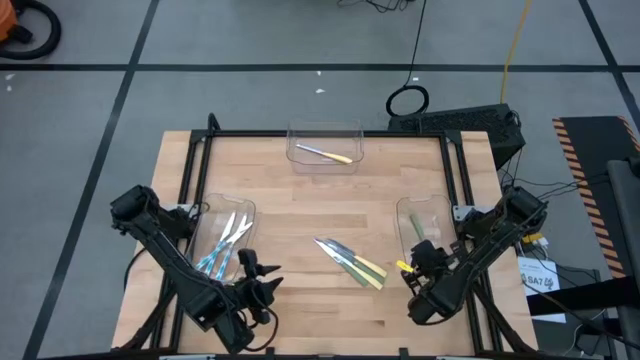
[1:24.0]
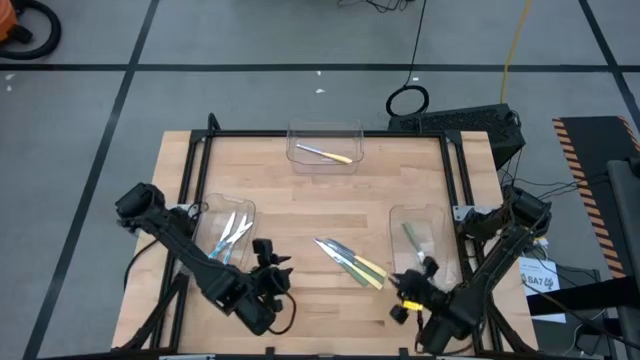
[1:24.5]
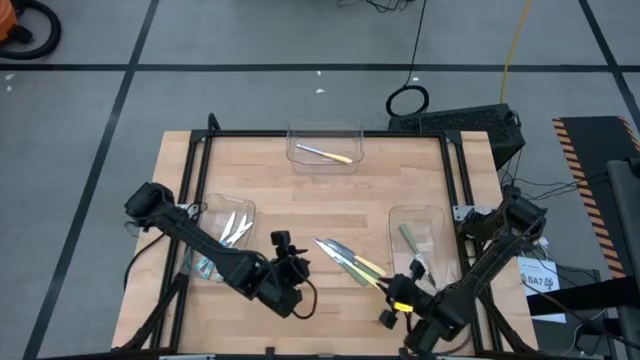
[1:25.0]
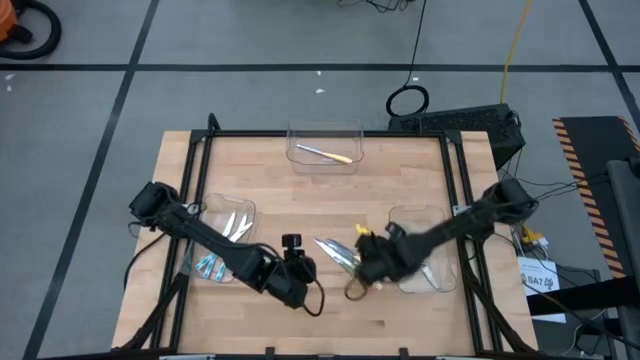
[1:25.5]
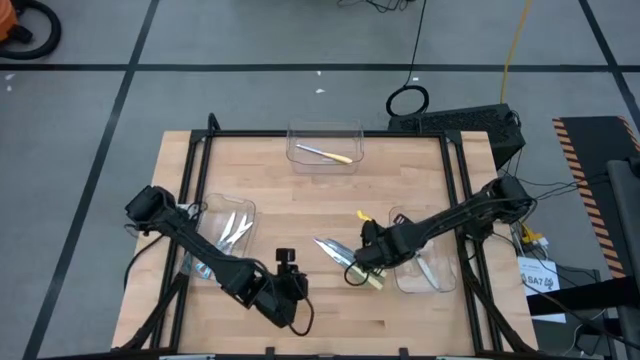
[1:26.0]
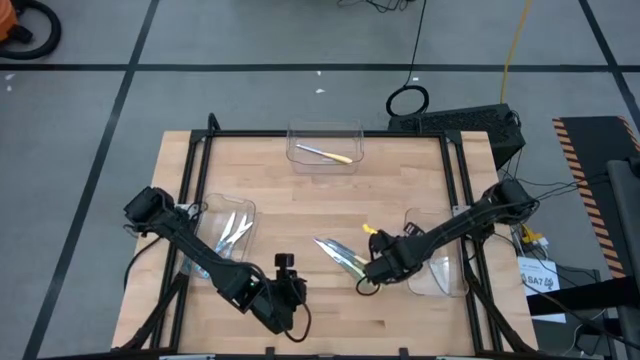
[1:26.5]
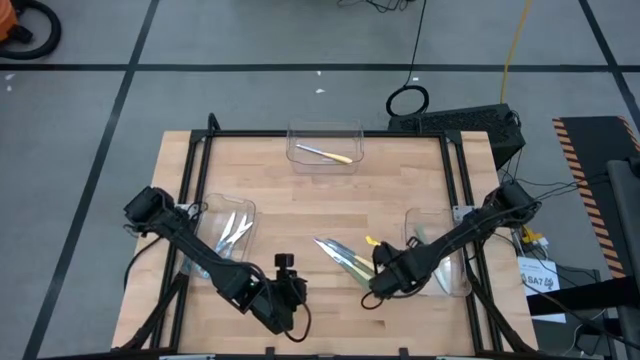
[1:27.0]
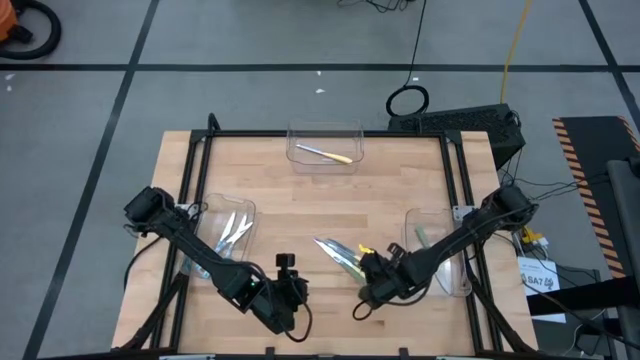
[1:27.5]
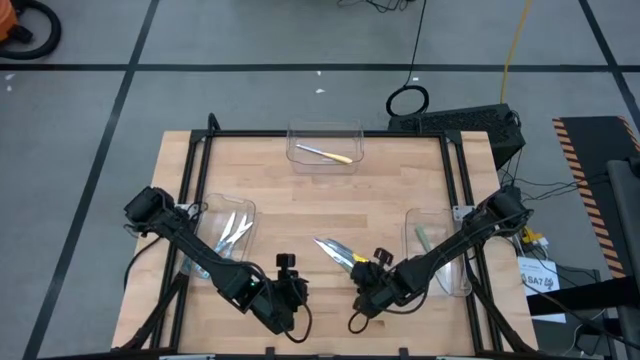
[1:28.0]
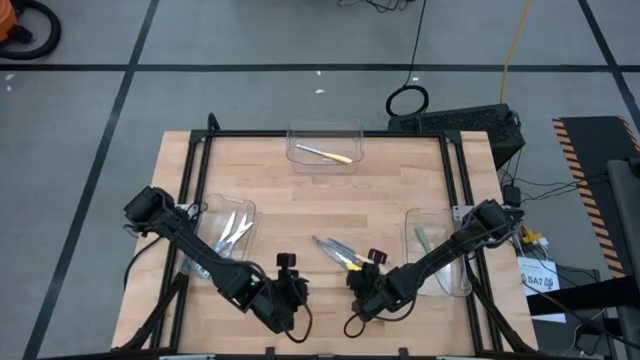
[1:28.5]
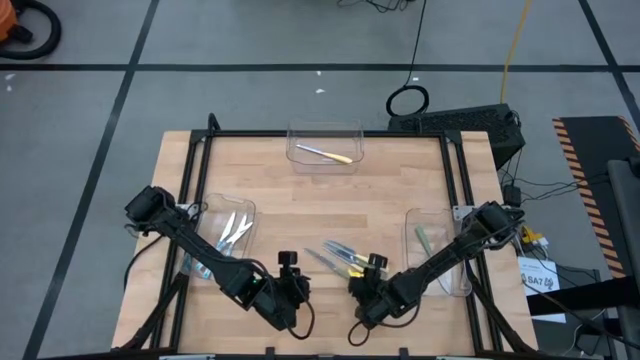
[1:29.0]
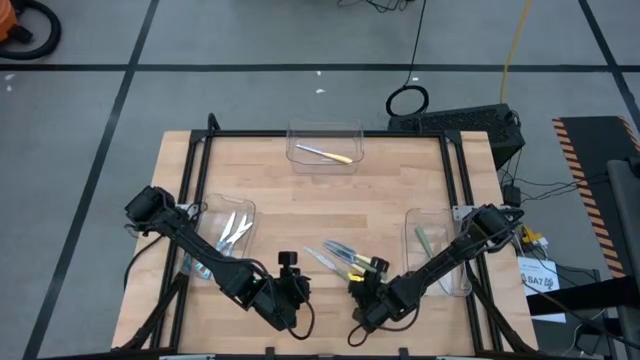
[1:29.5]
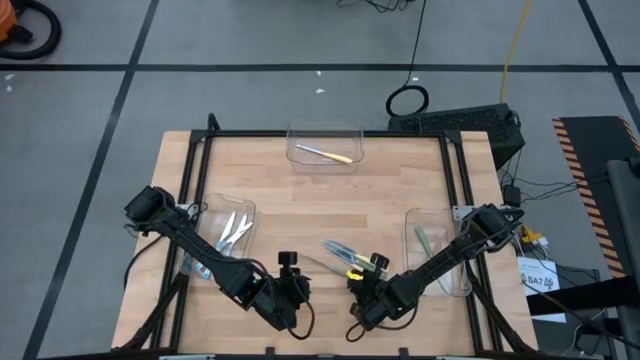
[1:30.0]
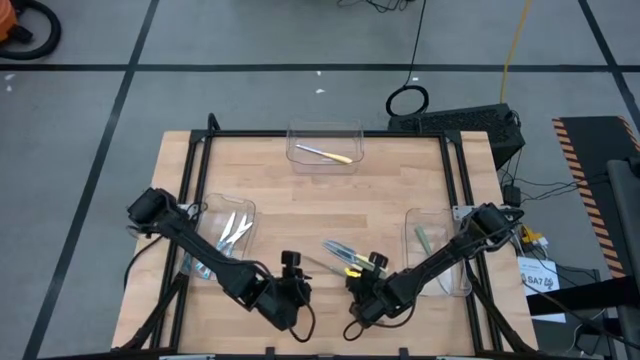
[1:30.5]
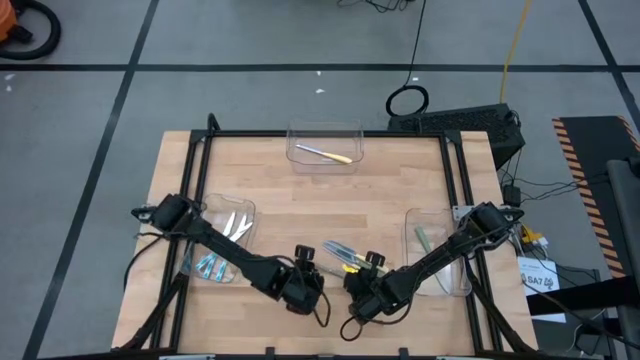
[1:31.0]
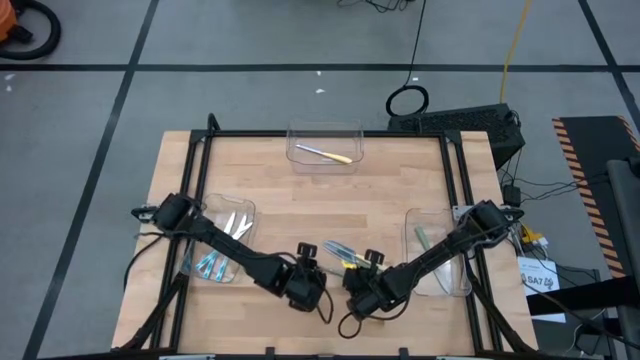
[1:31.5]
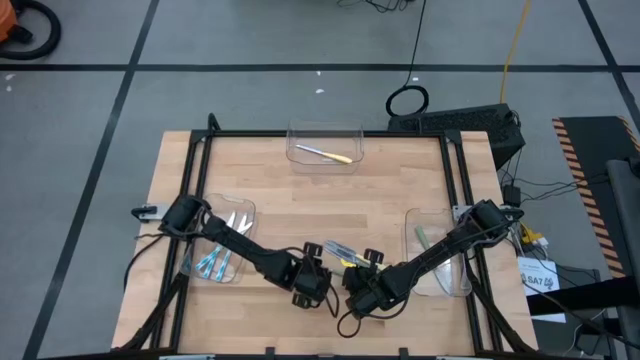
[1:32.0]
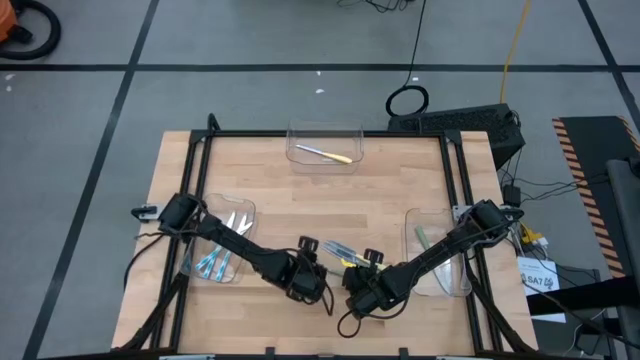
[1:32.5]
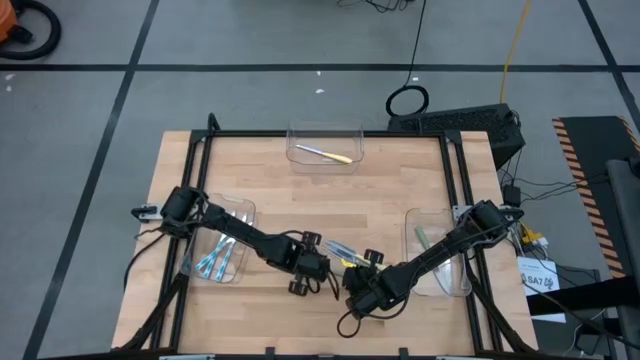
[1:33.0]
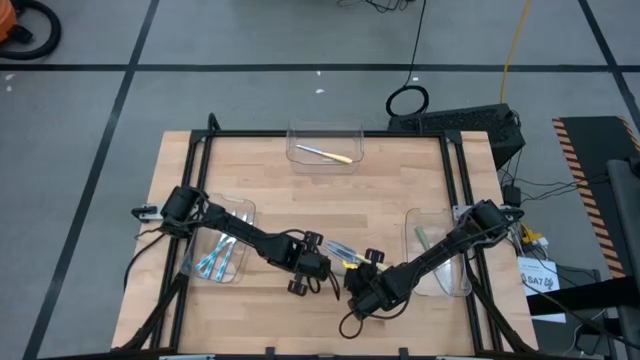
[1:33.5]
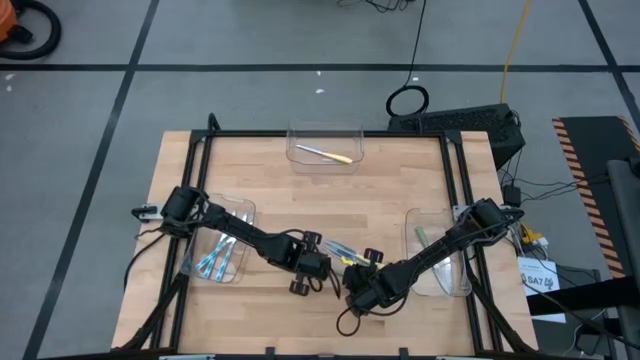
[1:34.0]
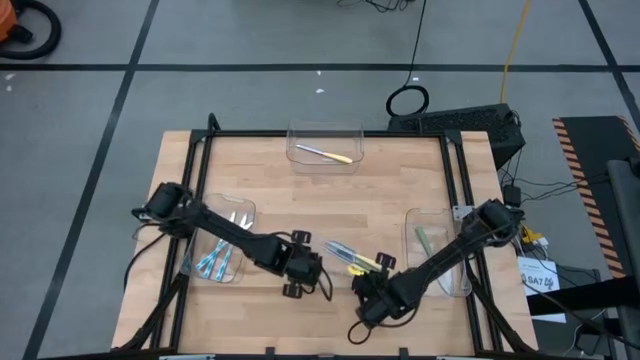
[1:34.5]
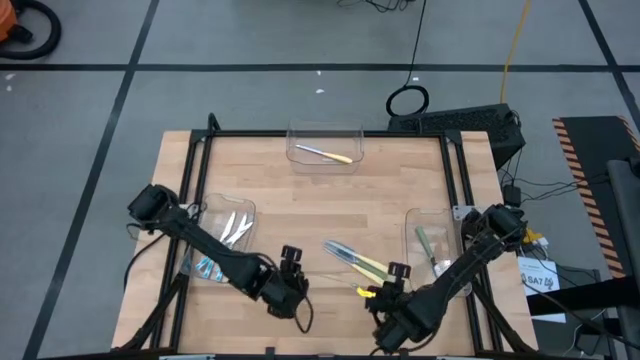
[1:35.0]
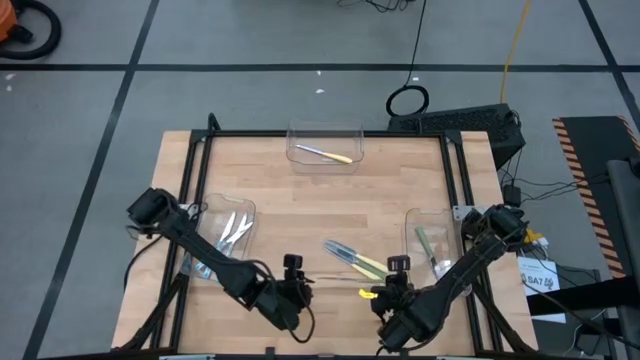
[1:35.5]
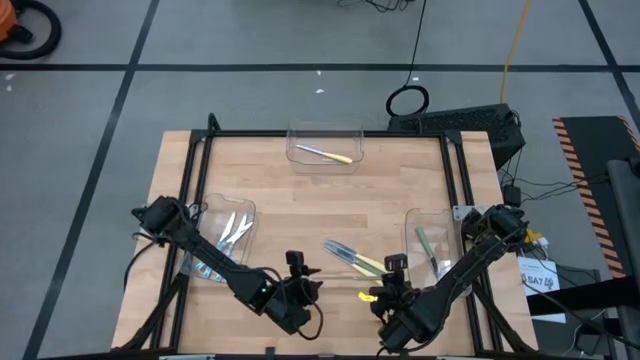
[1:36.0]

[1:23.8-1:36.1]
Task: Sort silverware by color (type)
Put the left green knife into the bottom right transparent bin

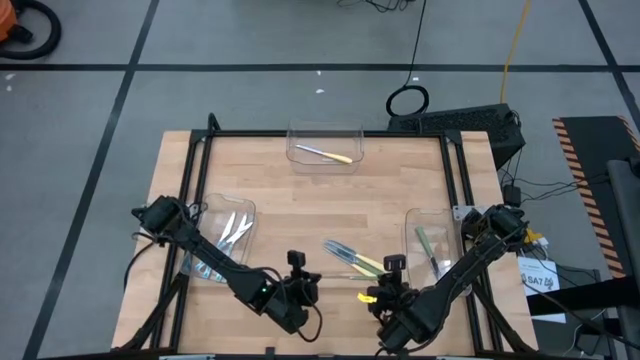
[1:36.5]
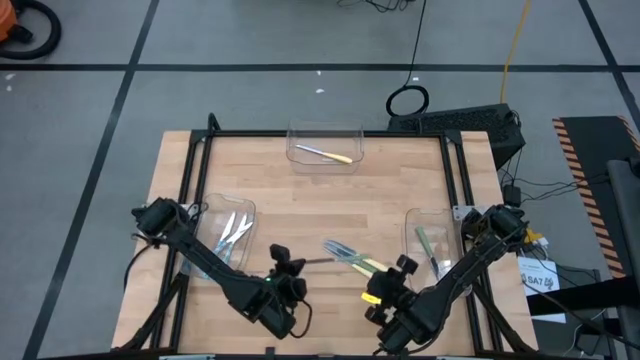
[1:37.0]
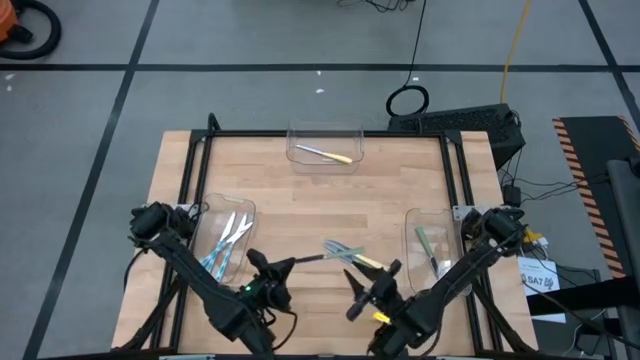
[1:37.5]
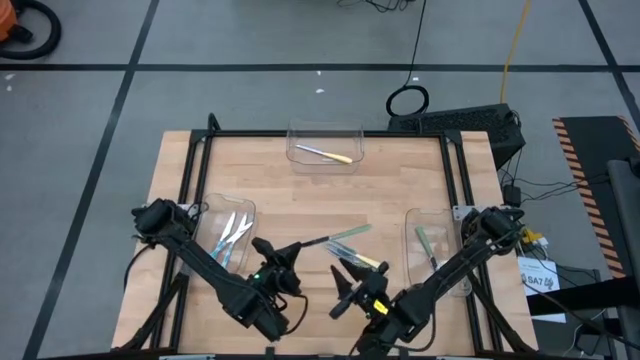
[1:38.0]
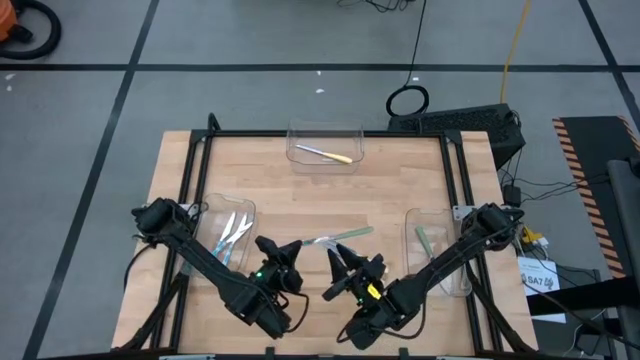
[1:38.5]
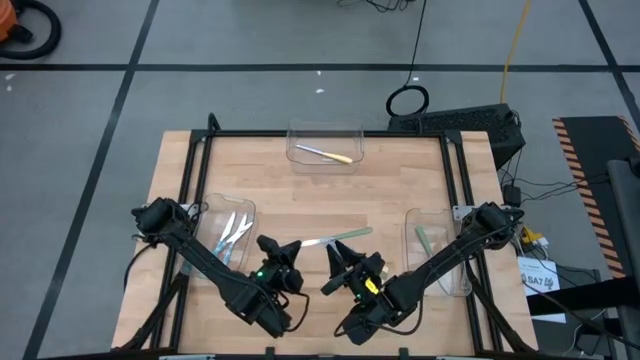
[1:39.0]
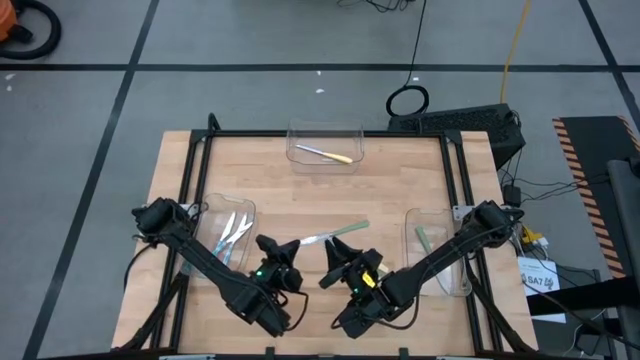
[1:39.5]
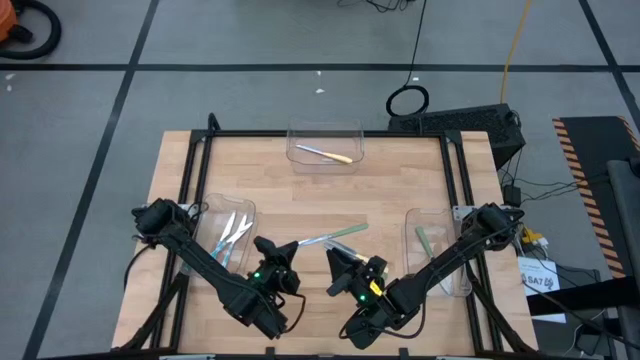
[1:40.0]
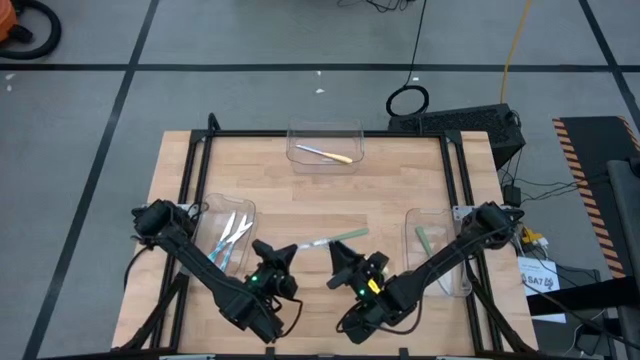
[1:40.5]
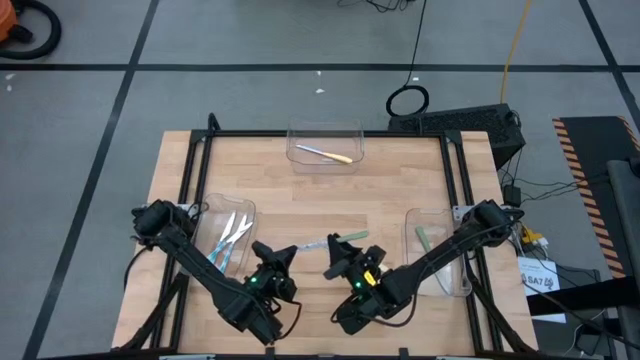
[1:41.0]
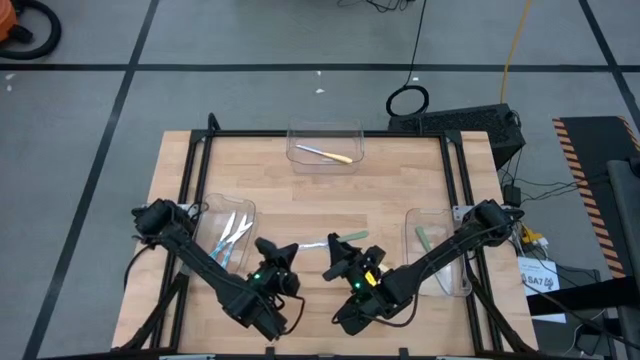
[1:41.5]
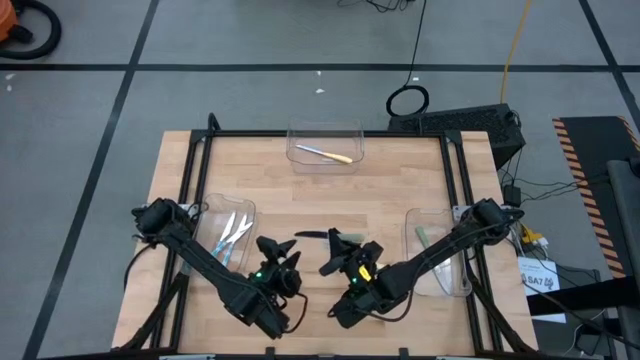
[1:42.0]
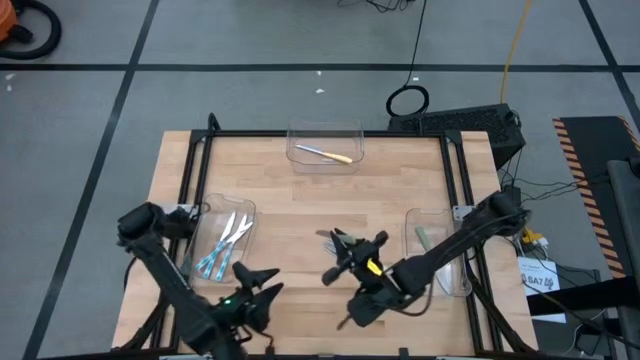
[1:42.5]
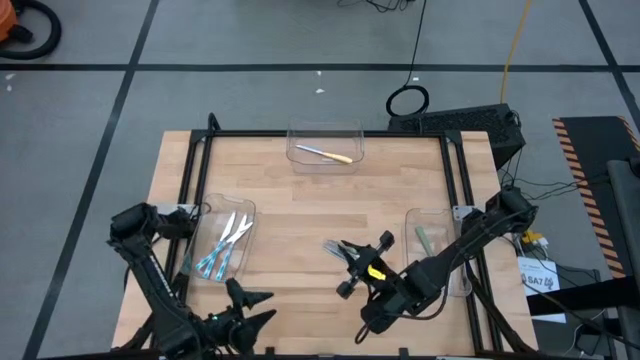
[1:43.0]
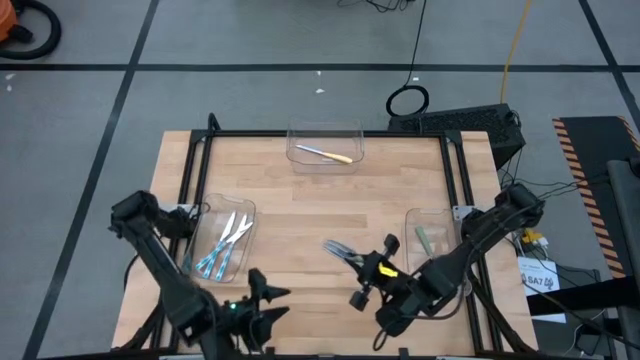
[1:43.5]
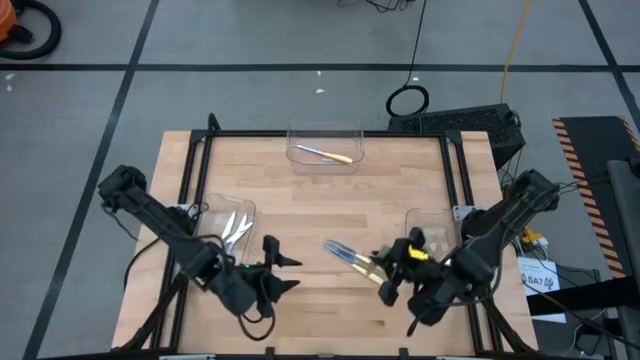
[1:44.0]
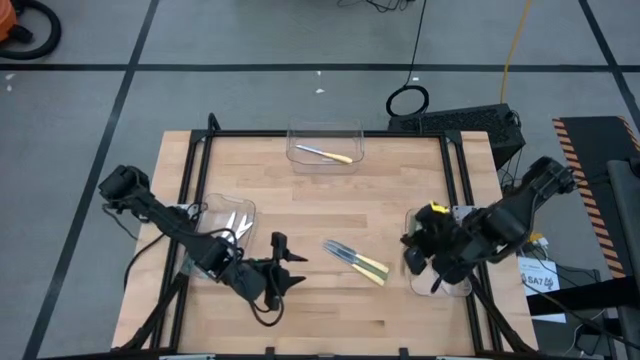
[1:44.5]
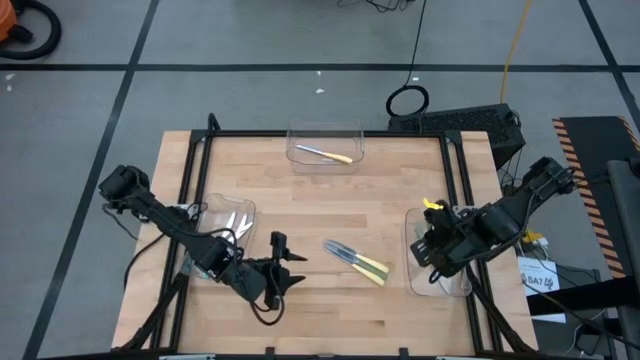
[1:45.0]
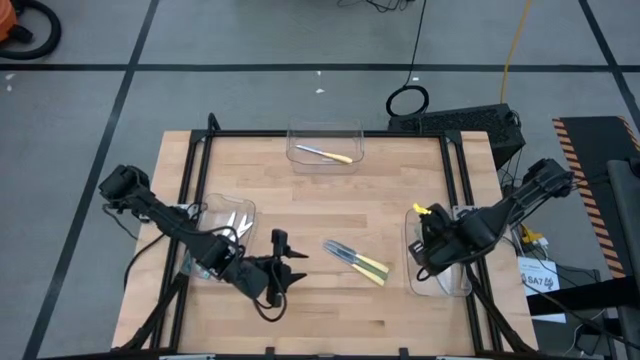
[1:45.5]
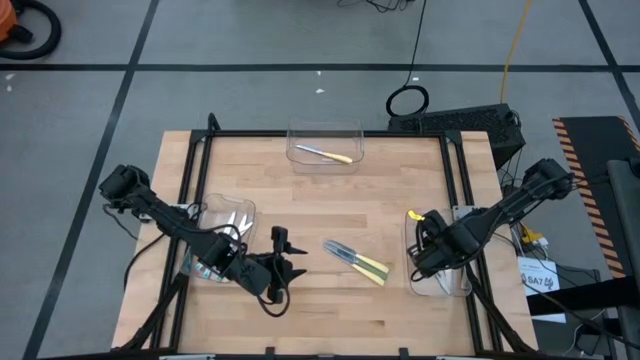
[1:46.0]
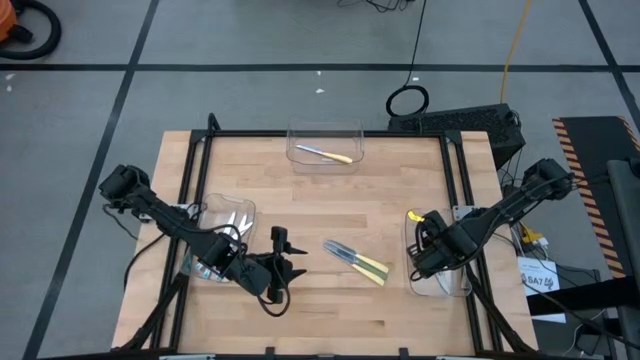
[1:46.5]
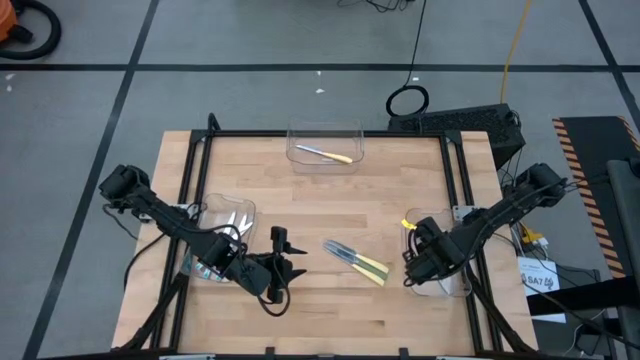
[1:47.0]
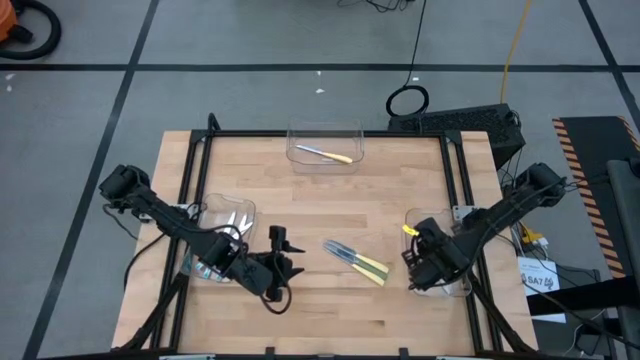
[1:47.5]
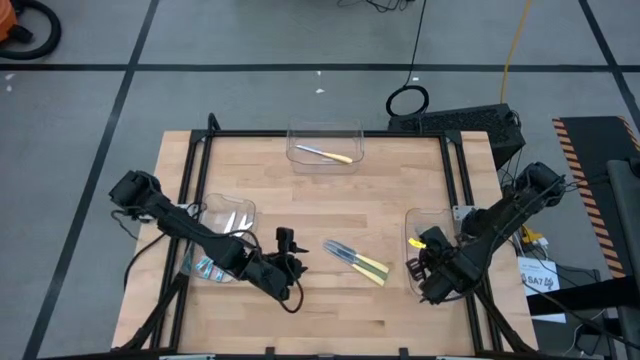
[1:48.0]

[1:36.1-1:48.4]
Put the left green knife into the bottom right transparent bin
